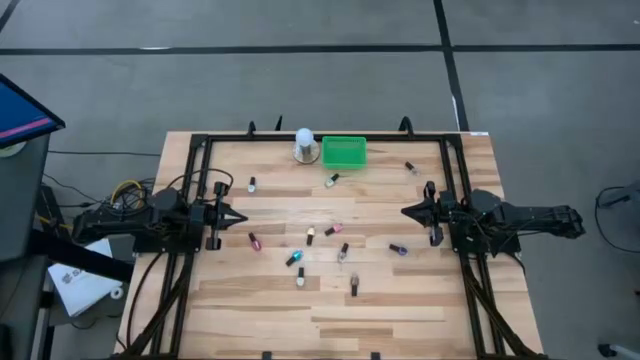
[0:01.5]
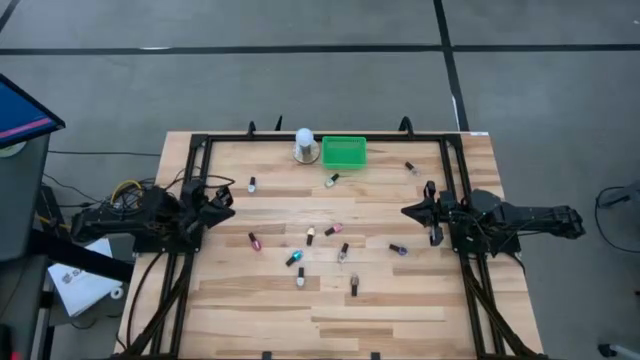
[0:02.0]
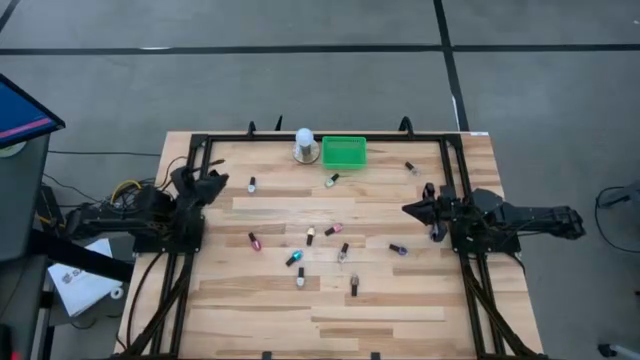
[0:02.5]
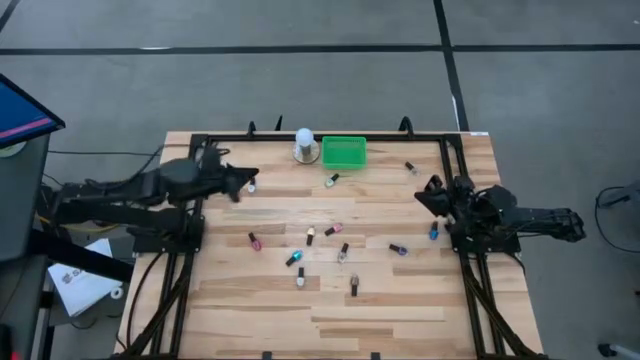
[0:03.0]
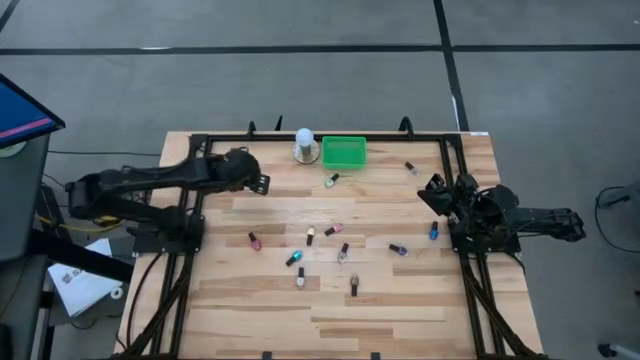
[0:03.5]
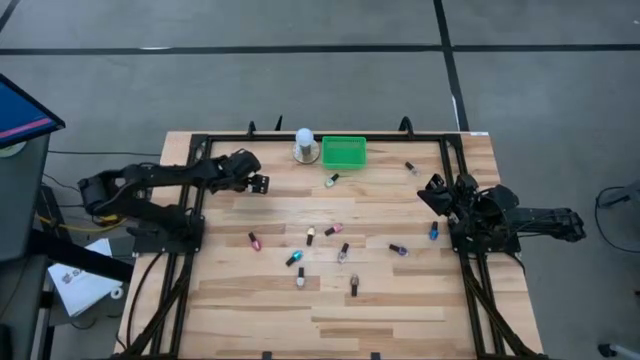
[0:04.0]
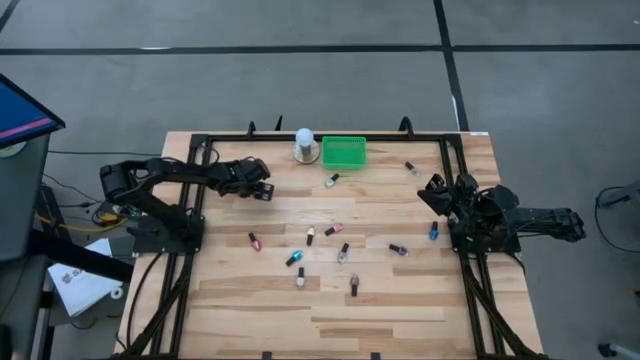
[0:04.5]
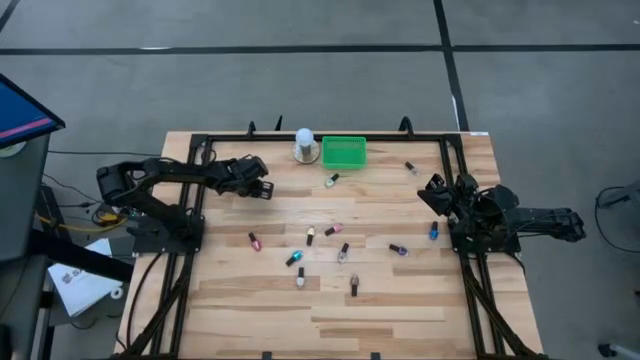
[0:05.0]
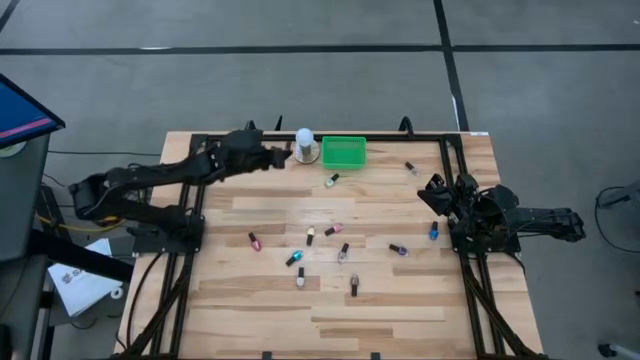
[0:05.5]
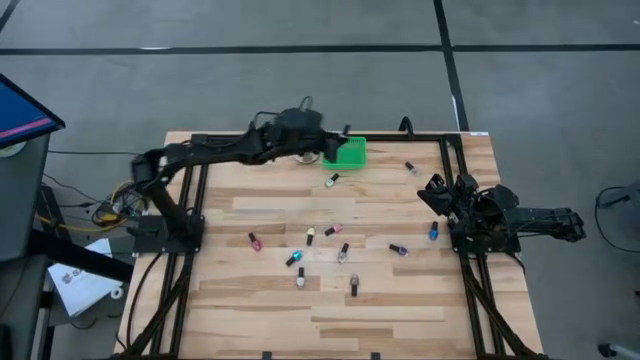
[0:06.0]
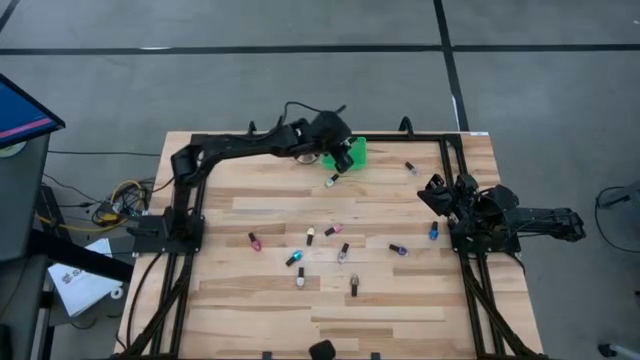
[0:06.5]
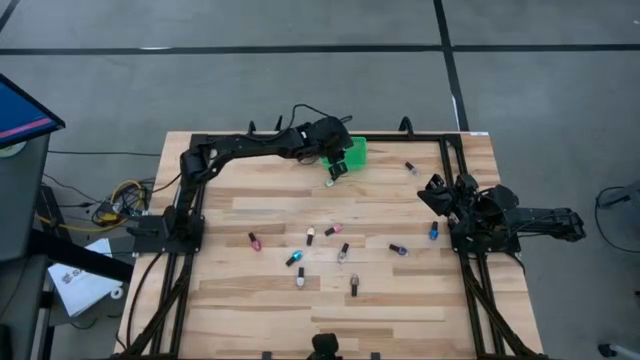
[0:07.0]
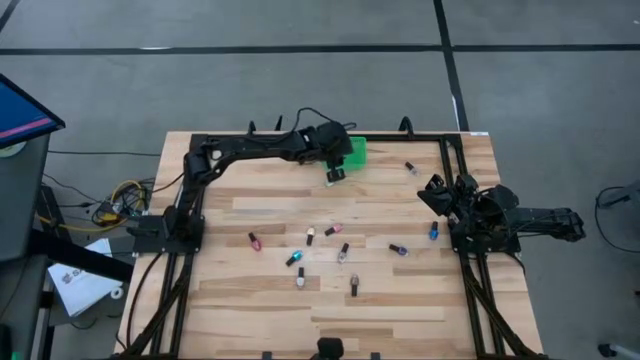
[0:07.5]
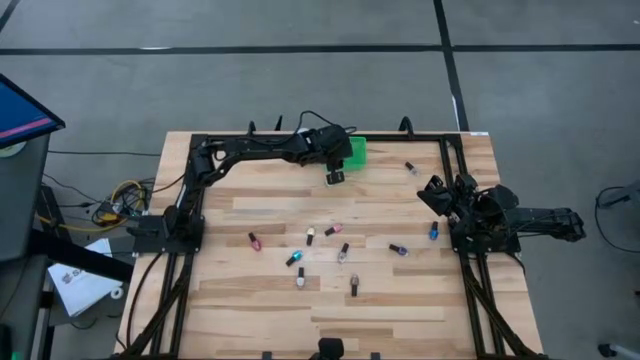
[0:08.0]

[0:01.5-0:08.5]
Task: Pick & Place Nail Polish
Put the white nail polish bottle into the green basket

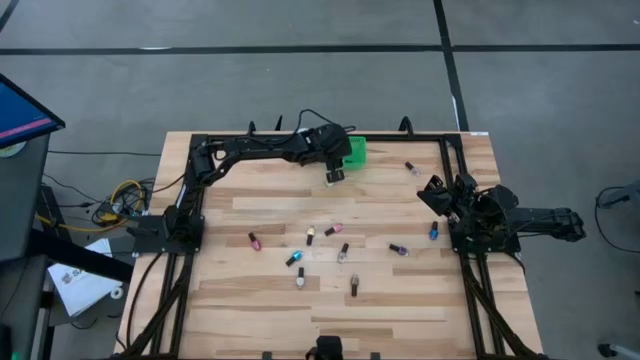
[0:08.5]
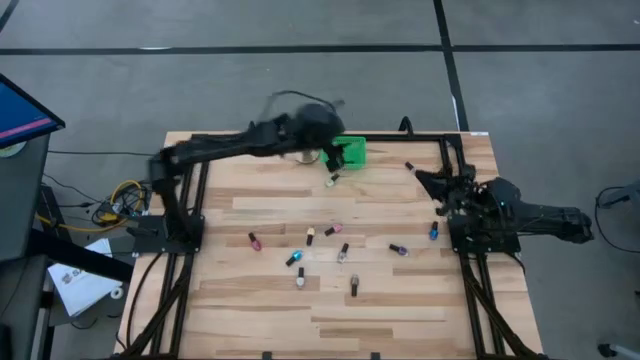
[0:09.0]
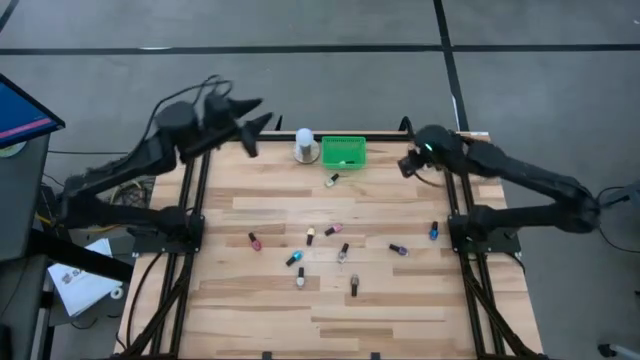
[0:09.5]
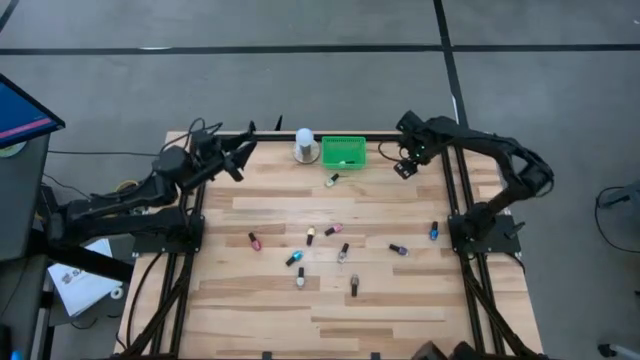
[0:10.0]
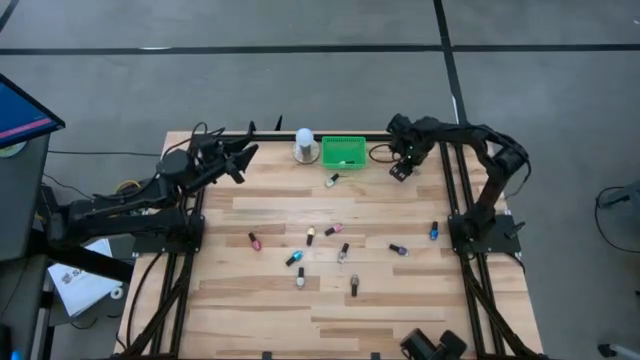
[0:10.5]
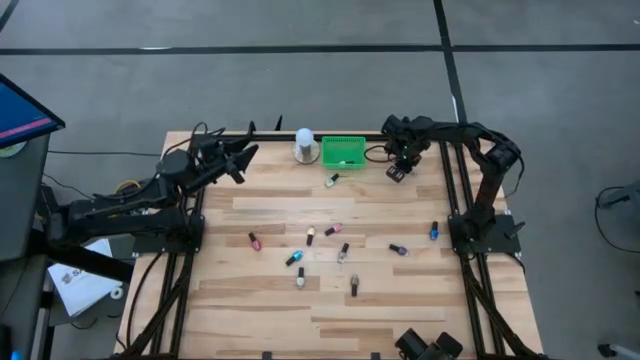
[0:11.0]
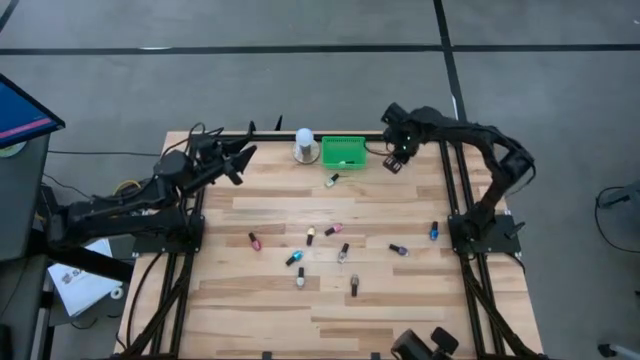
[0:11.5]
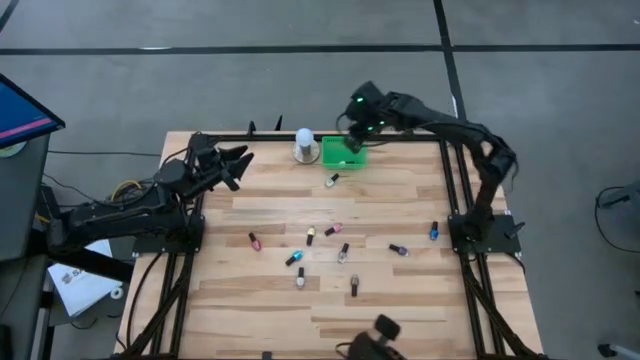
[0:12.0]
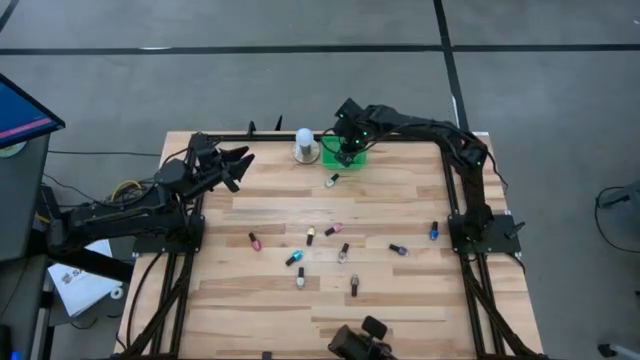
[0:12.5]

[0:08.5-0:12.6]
Put the transparent nail polish bottle into the green basket

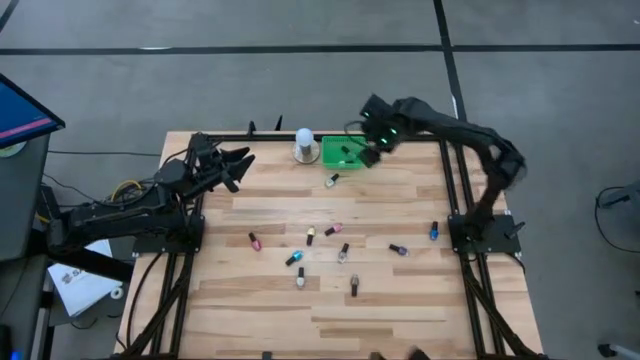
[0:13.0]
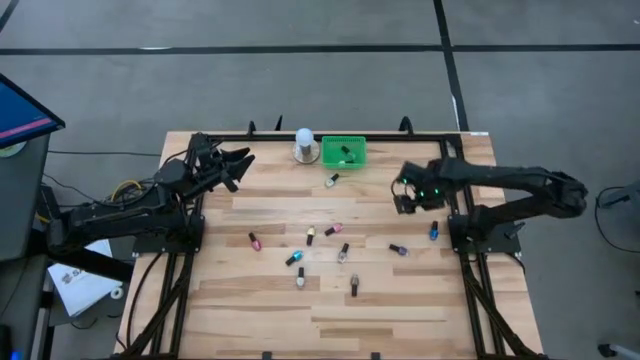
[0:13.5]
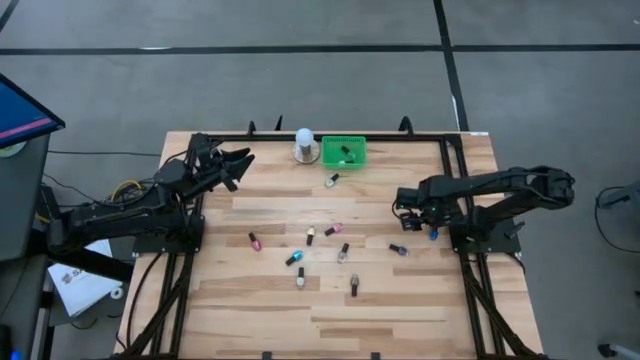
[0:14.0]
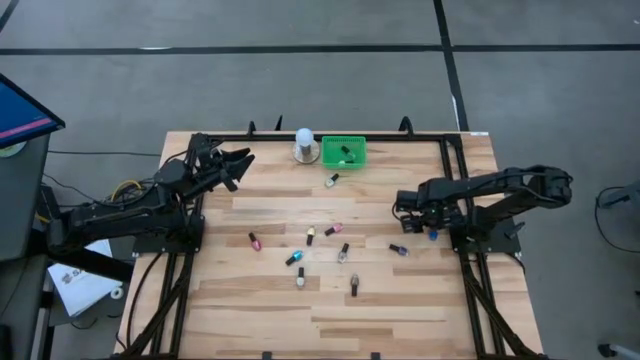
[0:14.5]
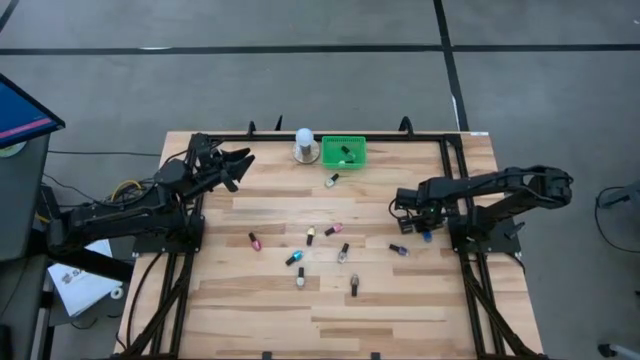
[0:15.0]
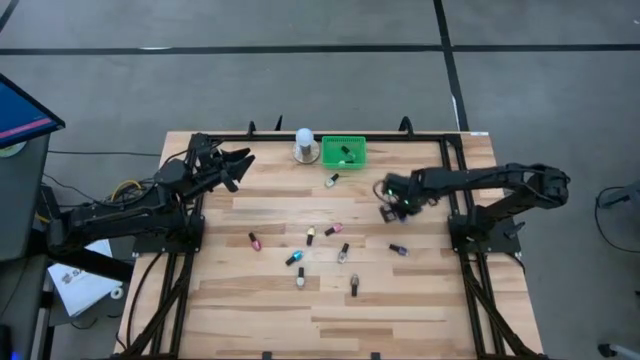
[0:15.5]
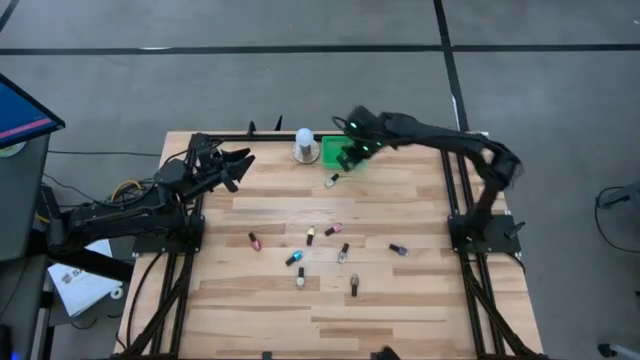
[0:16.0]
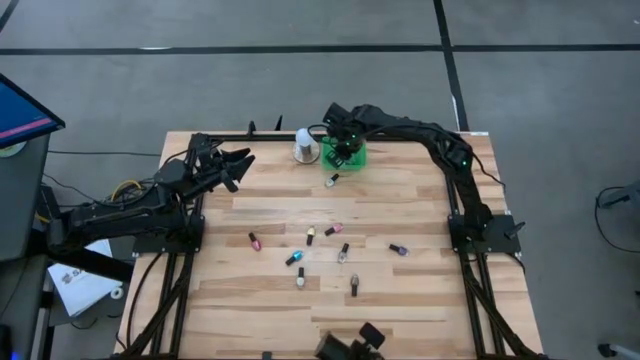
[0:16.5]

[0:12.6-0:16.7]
Put the blue nail polish bottle into the green basket

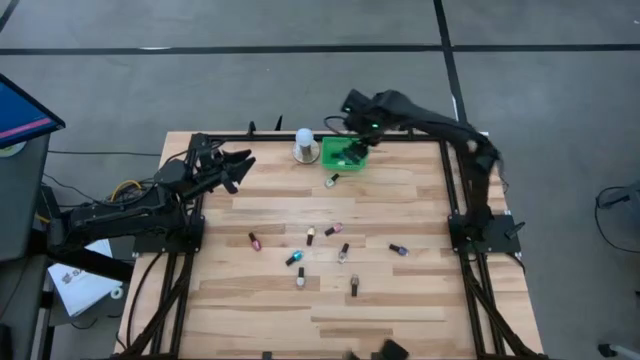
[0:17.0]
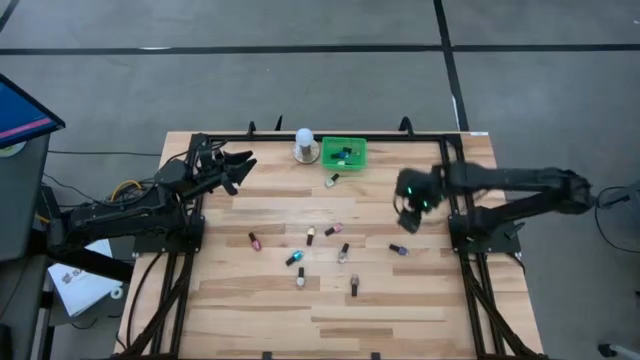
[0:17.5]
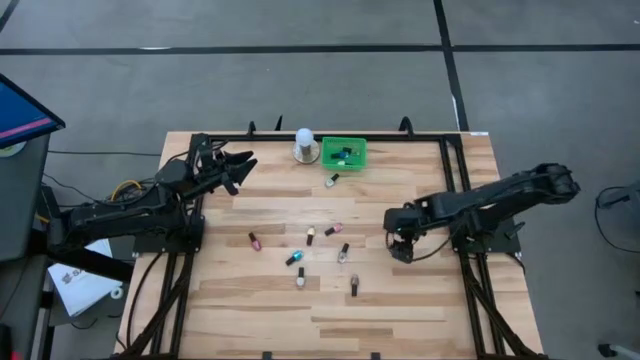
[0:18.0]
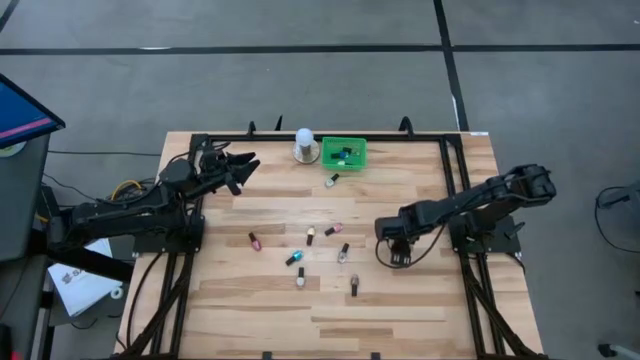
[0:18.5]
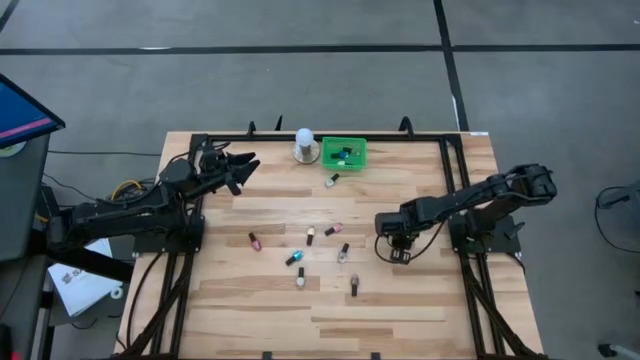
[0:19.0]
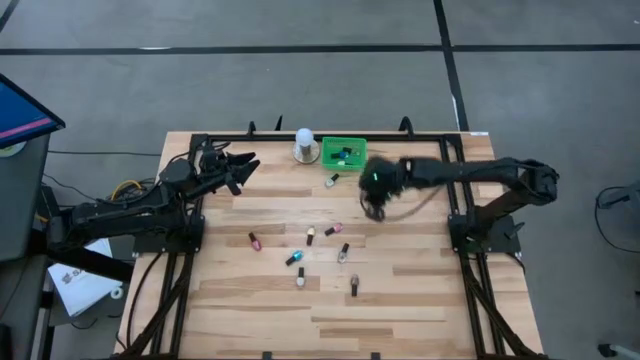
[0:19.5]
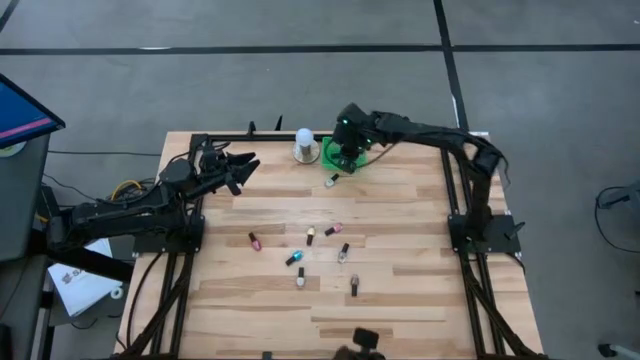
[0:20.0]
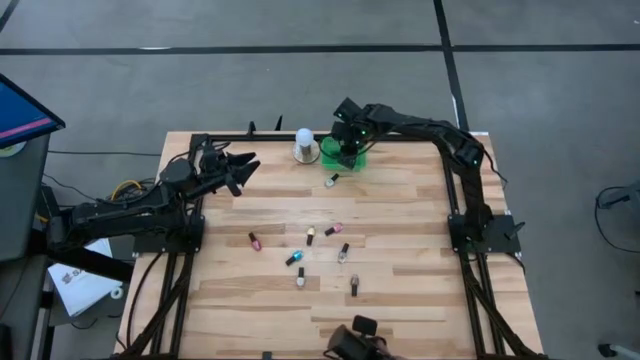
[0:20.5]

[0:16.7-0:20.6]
Put the violet nail polish bottle into the green basket

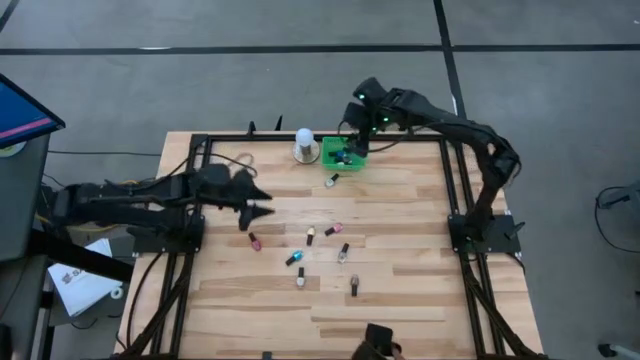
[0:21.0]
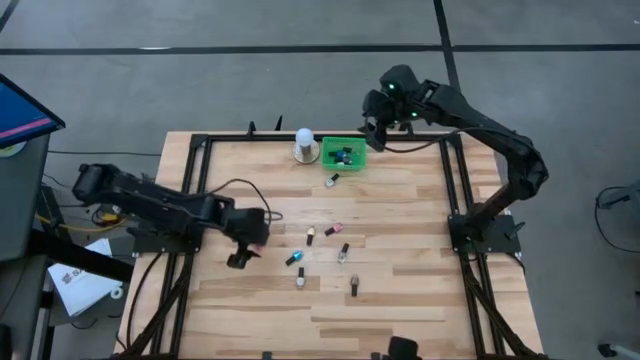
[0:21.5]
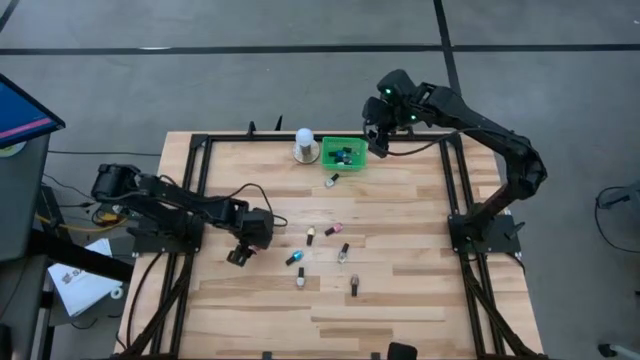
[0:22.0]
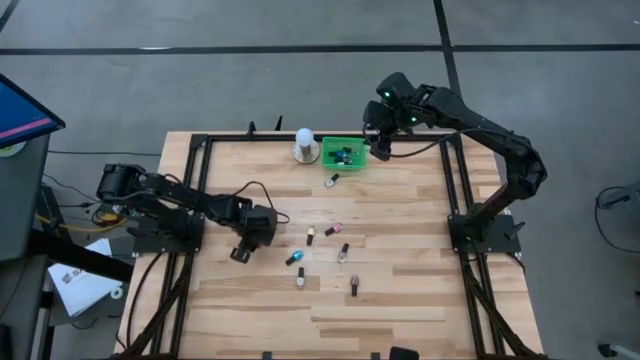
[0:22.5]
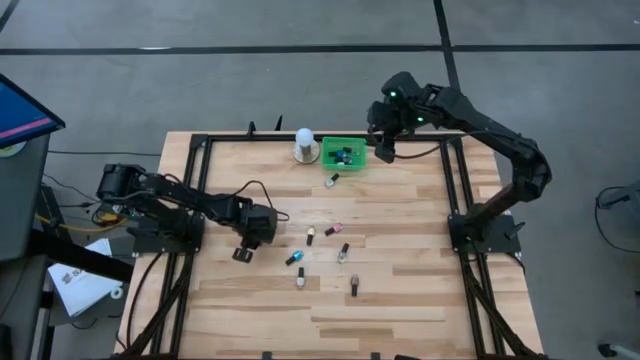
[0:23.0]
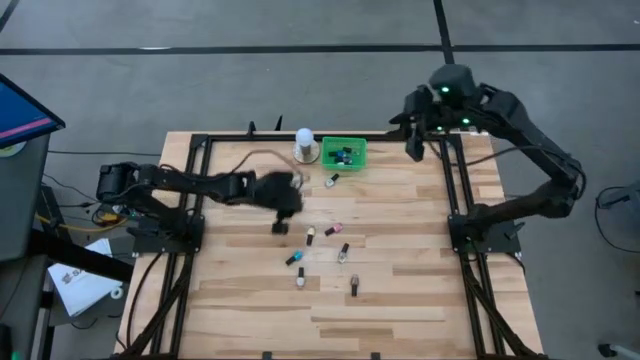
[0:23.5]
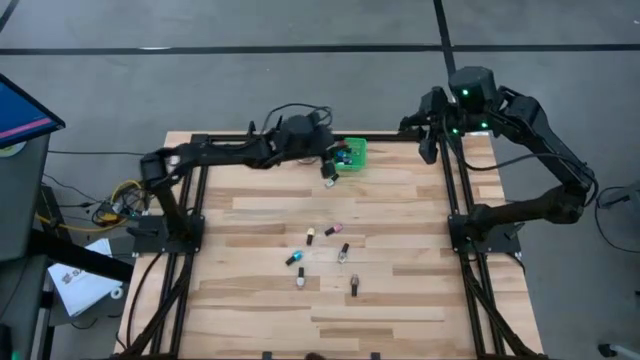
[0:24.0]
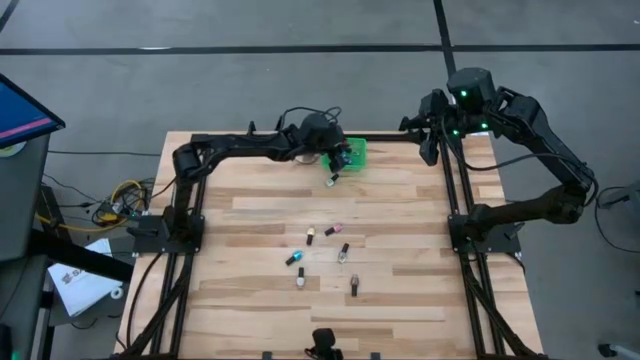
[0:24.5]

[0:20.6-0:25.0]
Put the red nail polish bottle into the green basket
